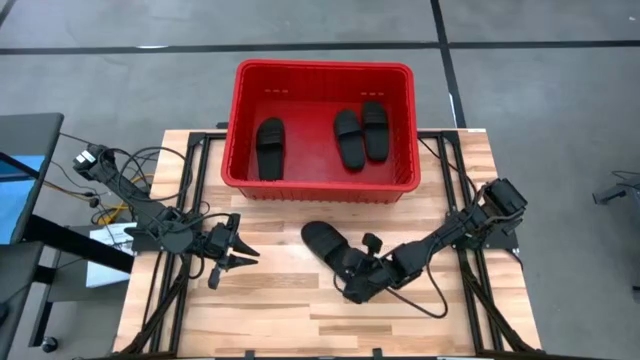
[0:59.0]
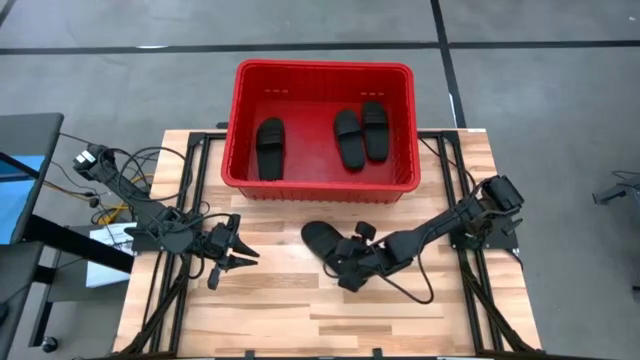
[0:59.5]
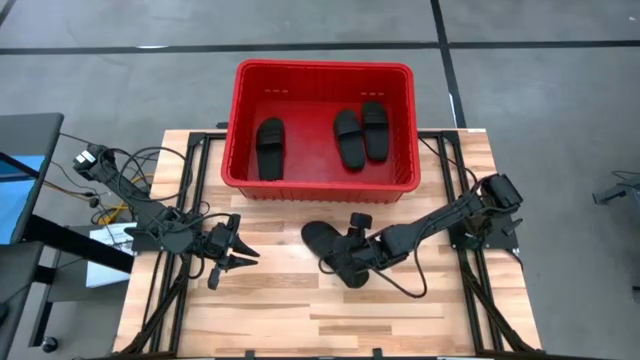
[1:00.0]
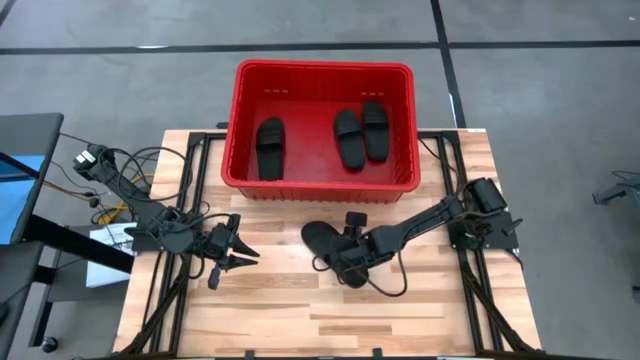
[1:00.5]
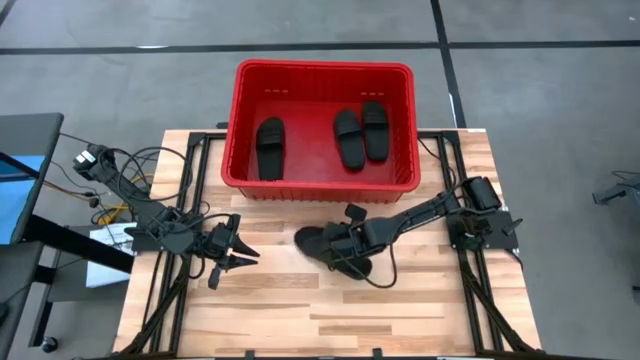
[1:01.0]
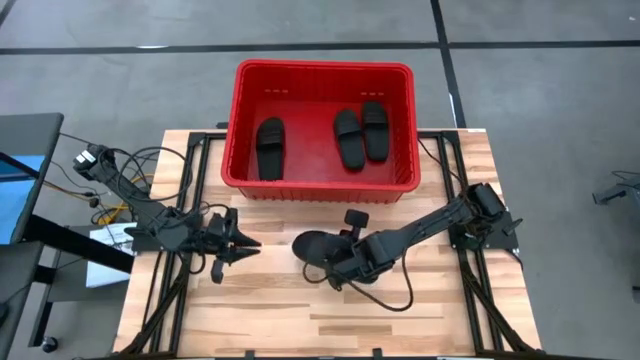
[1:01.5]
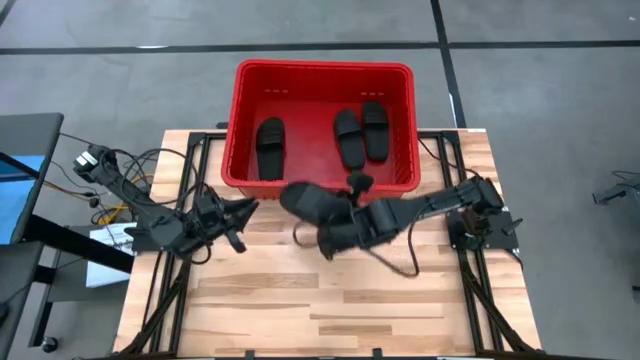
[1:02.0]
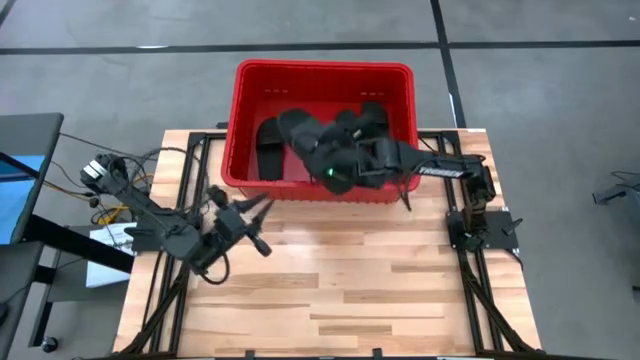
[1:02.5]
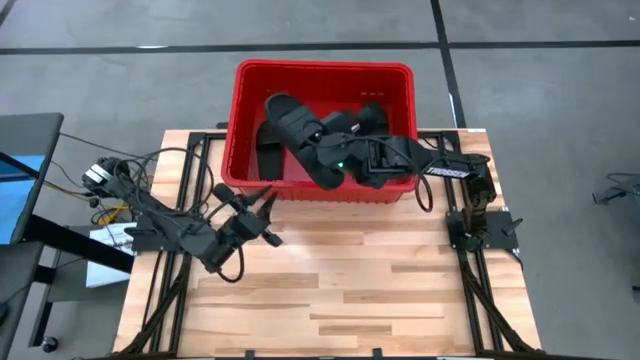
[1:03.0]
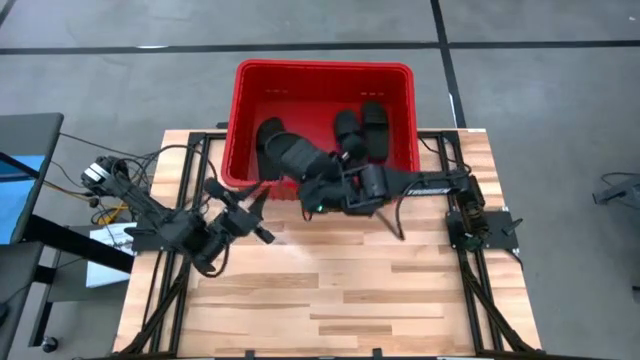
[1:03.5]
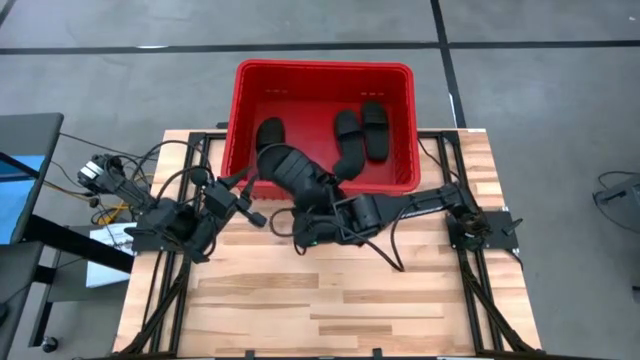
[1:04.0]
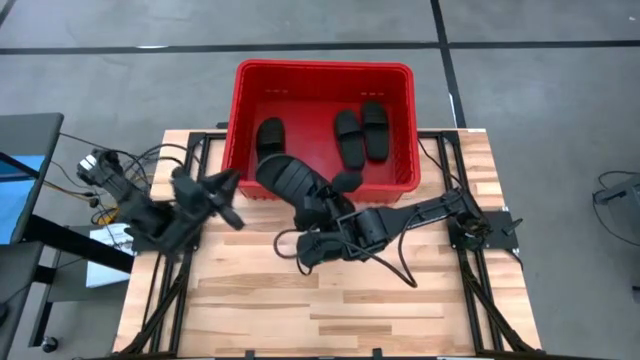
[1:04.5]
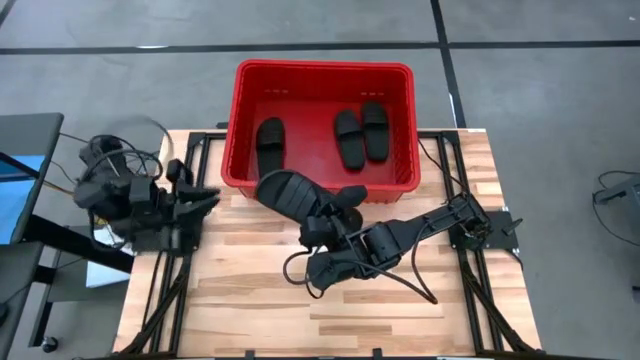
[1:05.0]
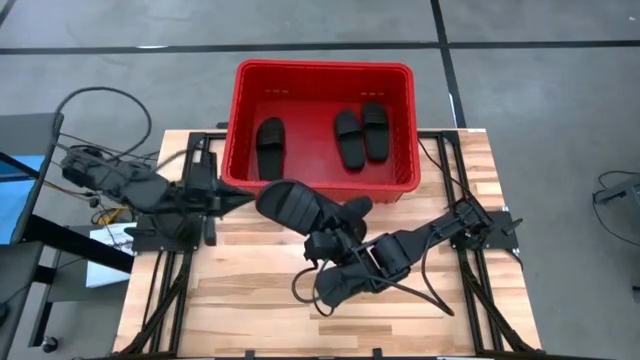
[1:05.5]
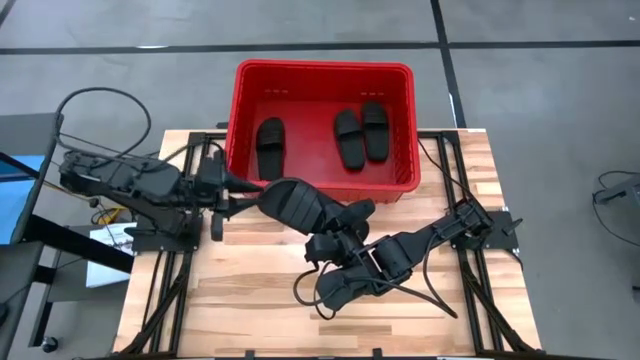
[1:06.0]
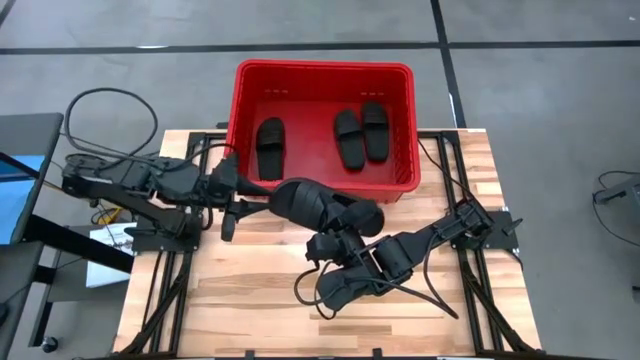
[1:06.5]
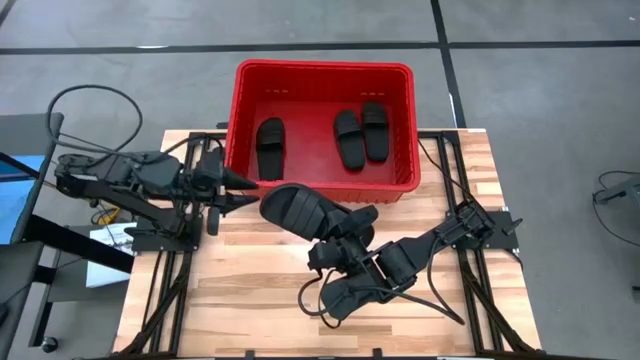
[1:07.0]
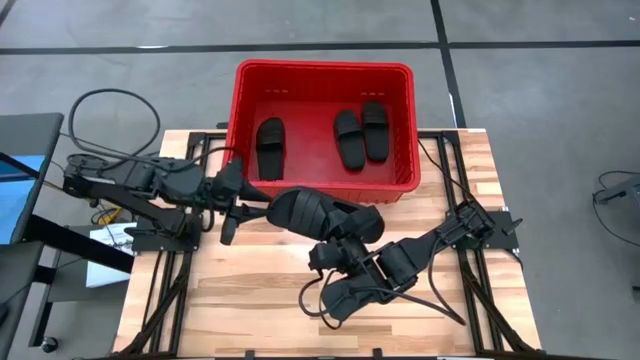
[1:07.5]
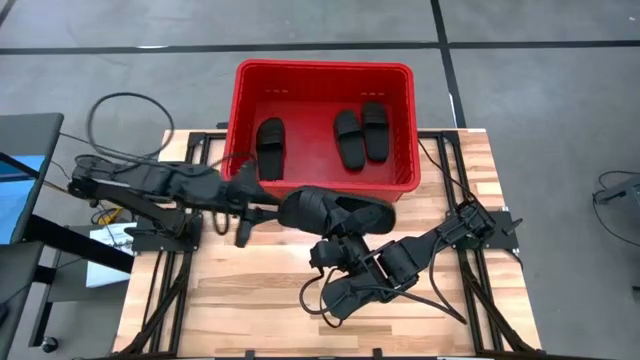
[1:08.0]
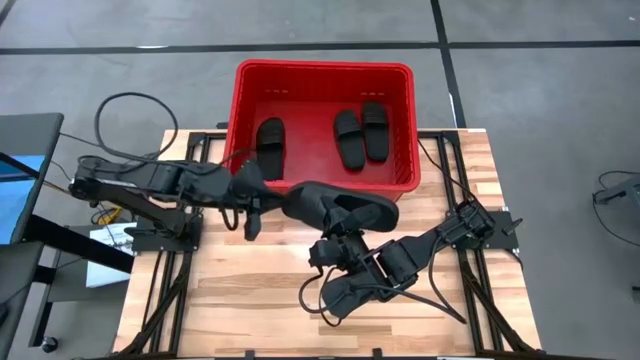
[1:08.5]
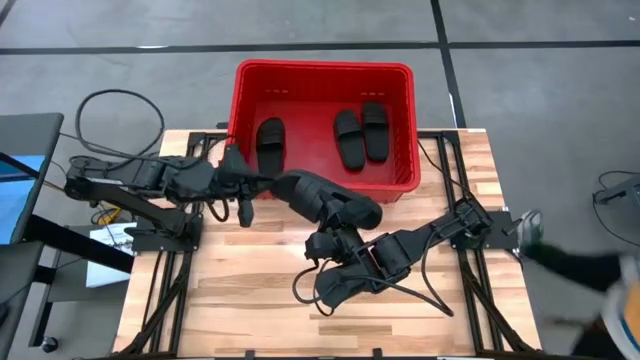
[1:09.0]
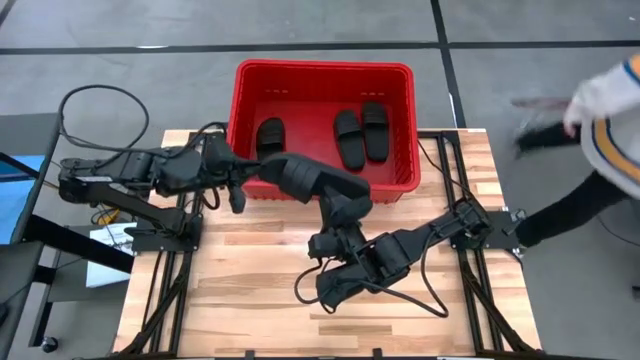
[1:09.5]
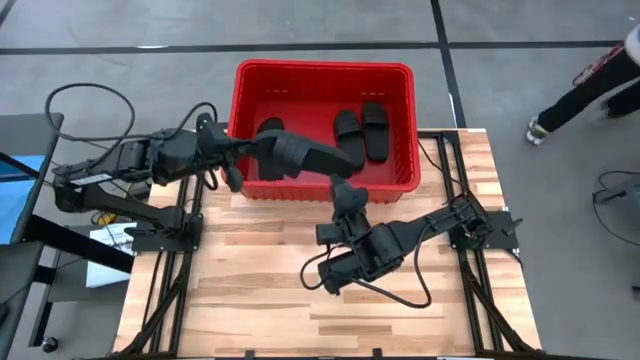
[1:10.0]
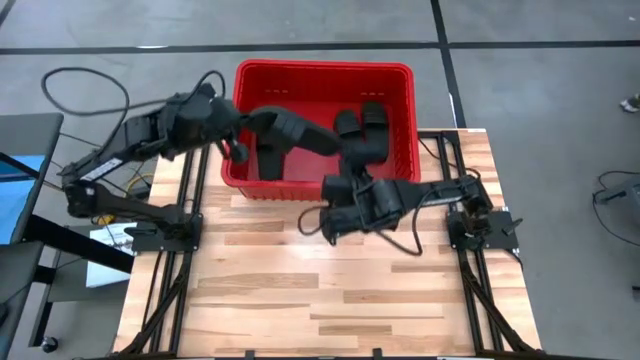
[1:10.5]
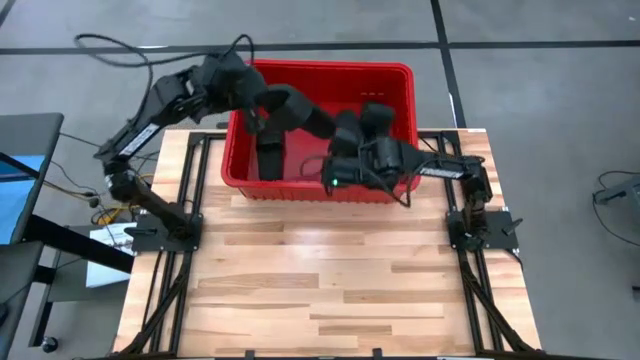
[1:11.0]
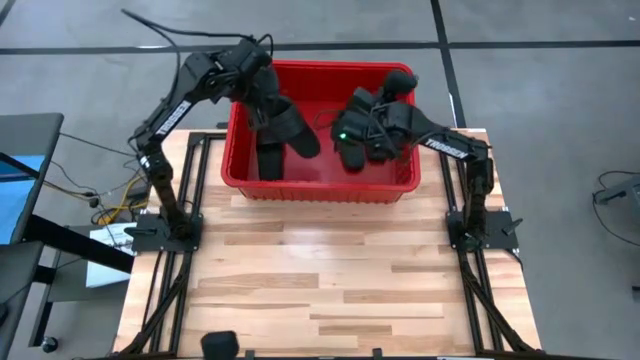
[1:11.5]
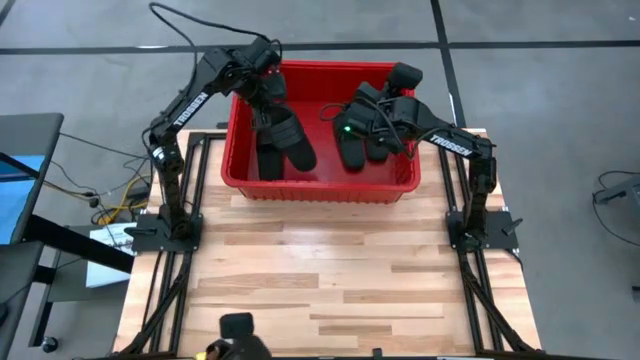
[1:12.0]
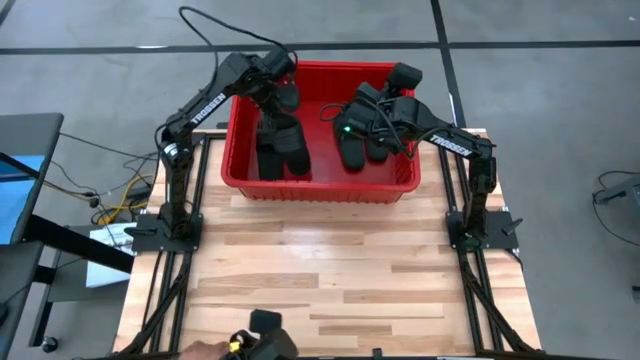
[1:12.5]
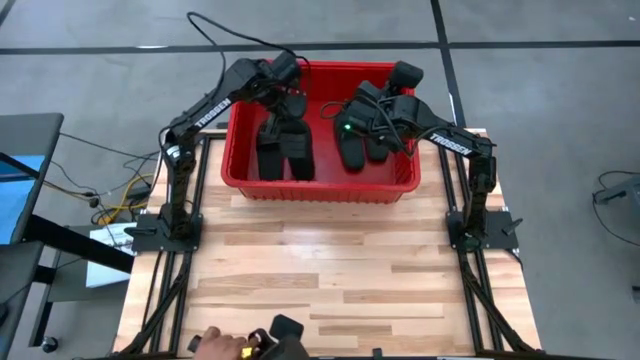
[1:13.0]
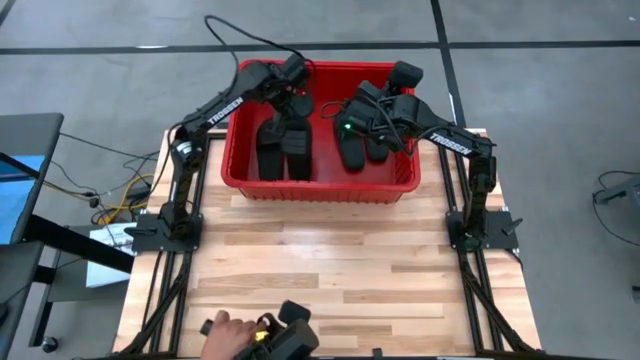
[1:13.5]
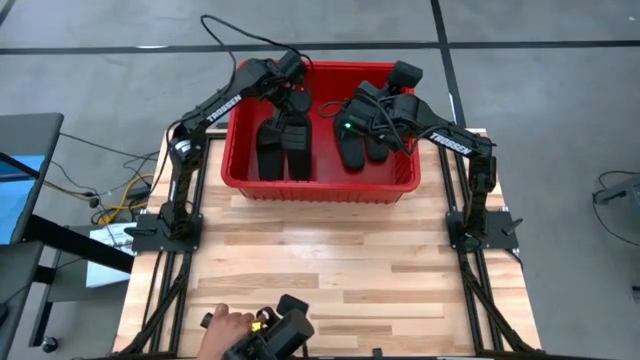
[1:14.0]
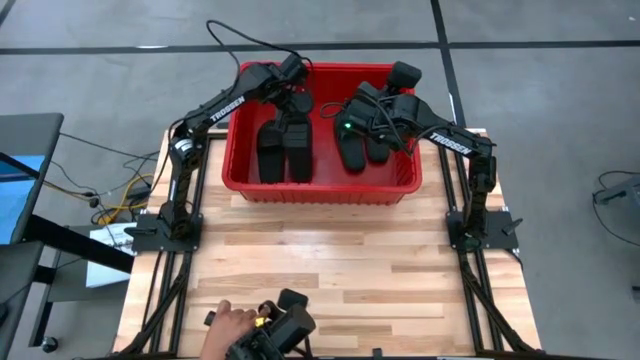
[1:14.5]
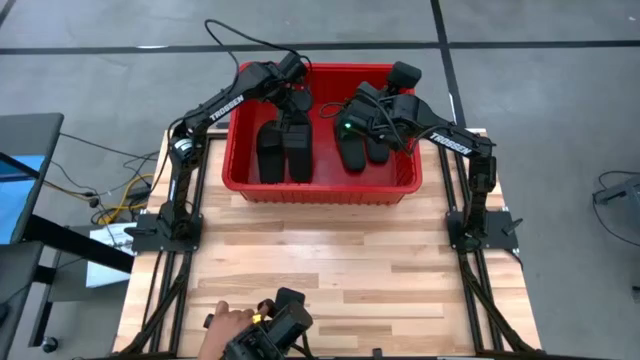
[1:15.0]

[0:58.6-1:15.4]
Task: Pick and place slides into bin
Put the black slide into the red container

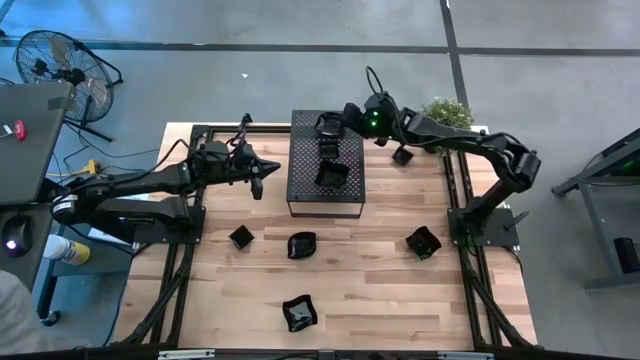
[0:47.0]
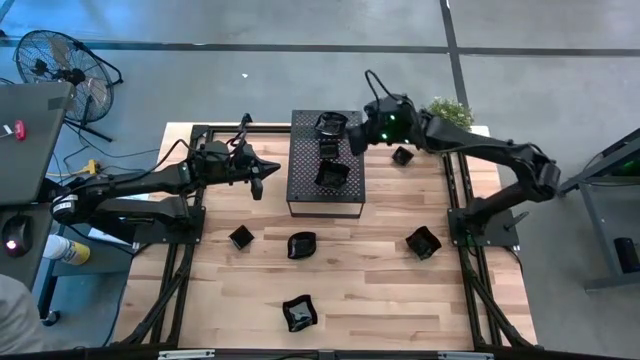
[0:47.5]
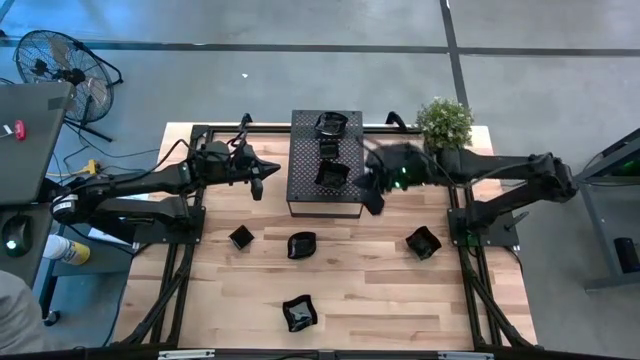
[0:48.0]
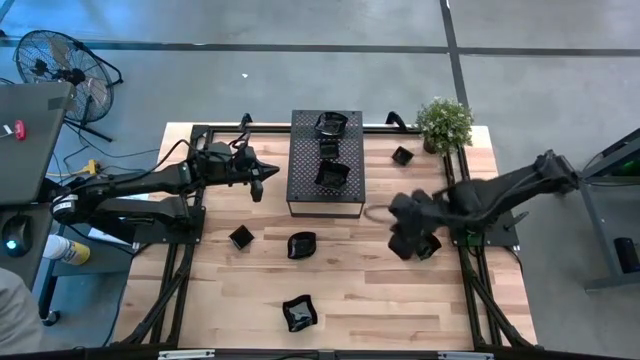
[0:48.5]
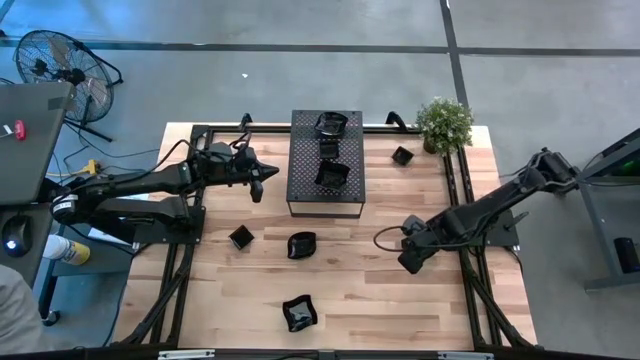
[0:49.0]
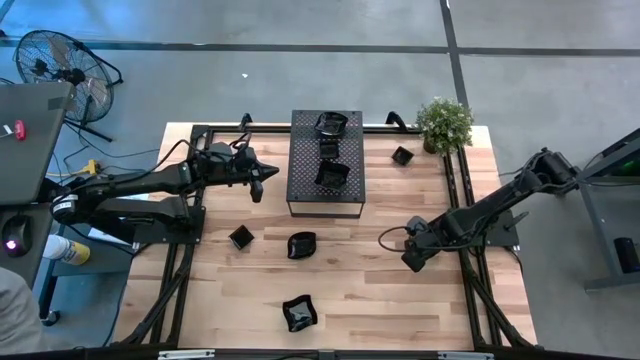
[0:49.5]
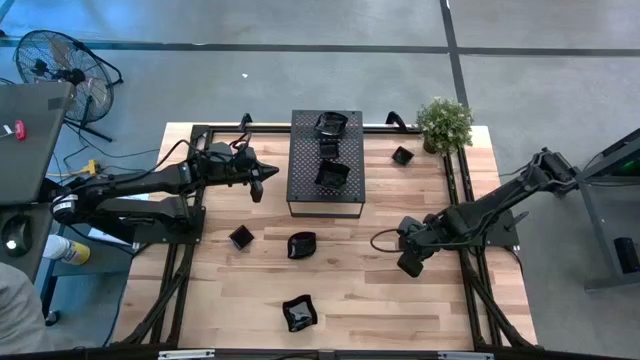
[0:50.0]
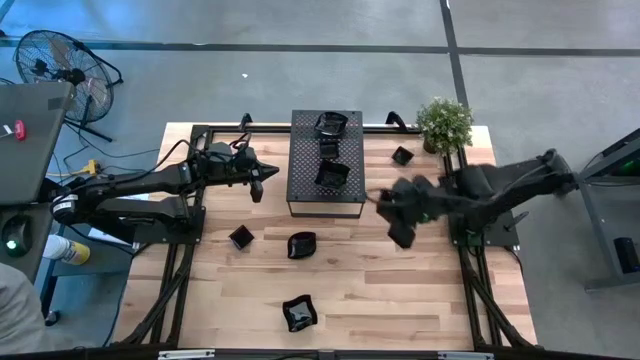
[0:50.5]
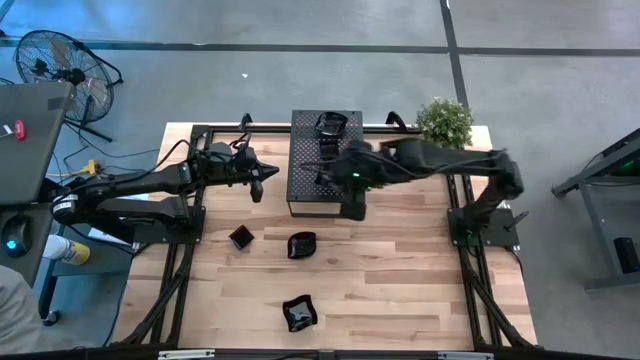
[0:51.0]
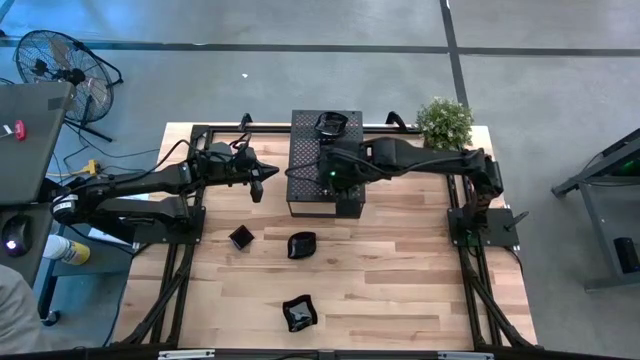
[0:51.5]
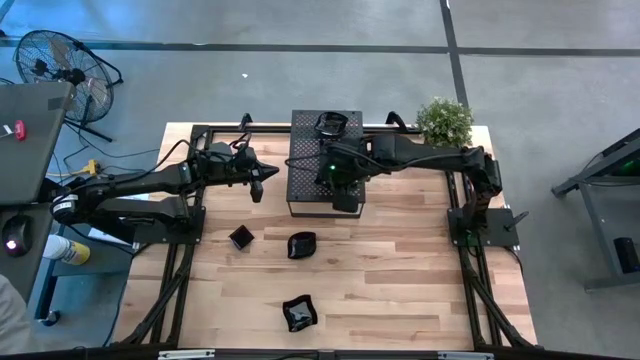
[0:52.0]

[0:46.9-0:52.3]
Task: Pick & Place Mini shaped plates
Stack the distorted square plate on top of the stacked distorted square plates on the shelf

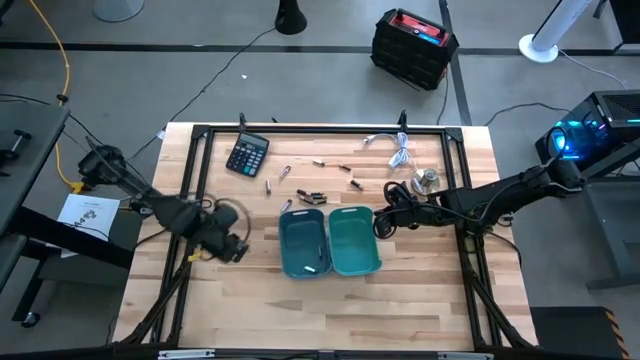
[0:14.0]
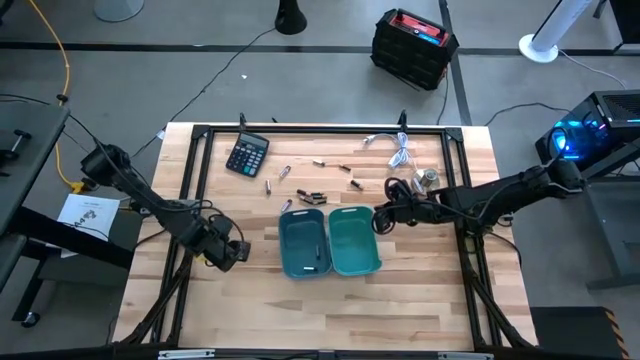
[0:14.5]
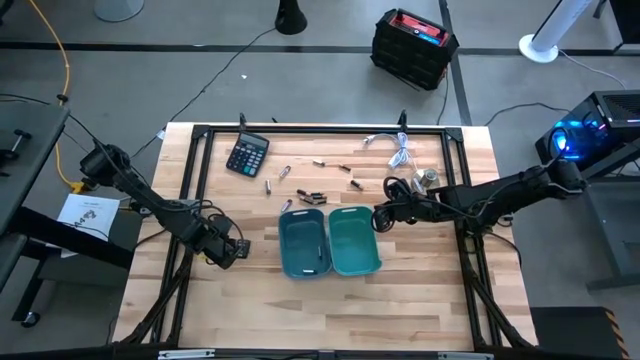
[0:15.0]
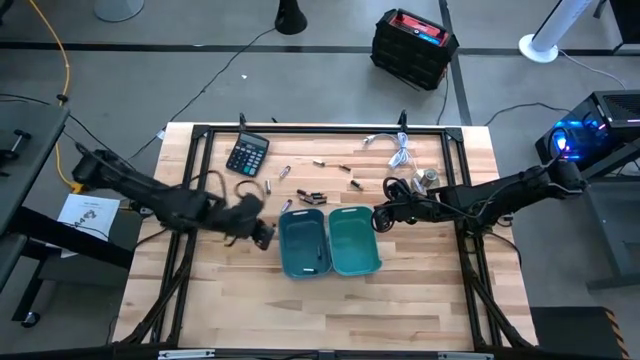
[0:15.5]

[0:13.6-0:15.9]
Task: Sort batteries
Put the silver battery into the blue bin
